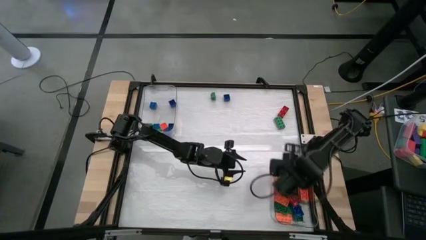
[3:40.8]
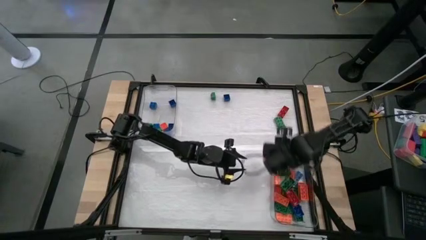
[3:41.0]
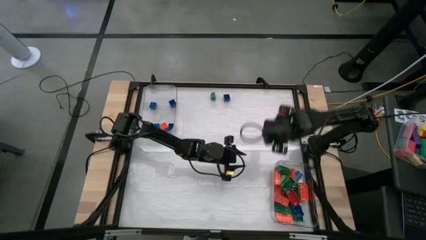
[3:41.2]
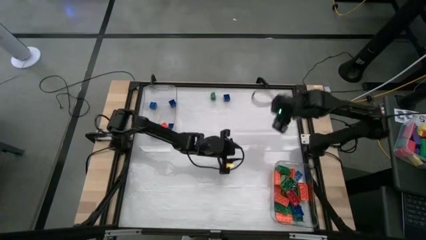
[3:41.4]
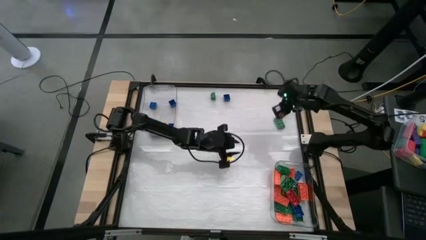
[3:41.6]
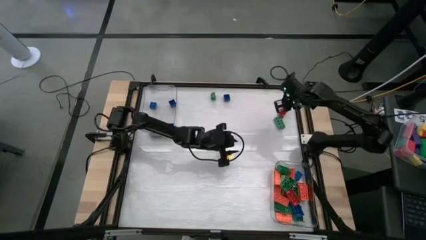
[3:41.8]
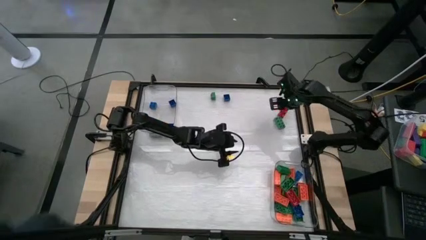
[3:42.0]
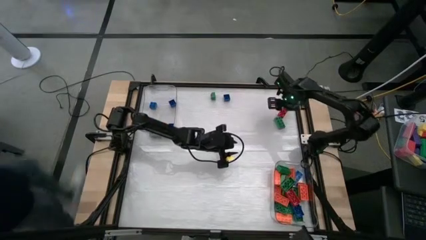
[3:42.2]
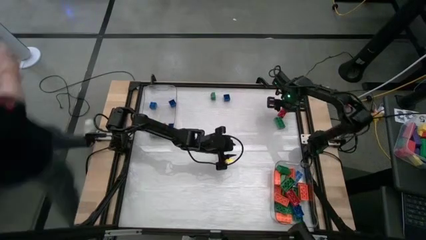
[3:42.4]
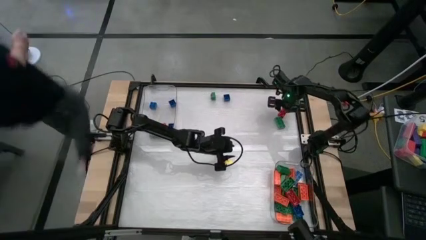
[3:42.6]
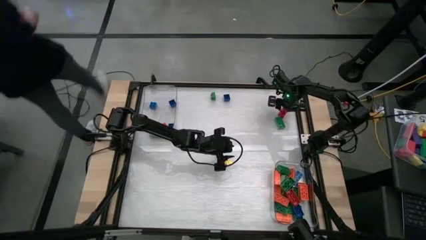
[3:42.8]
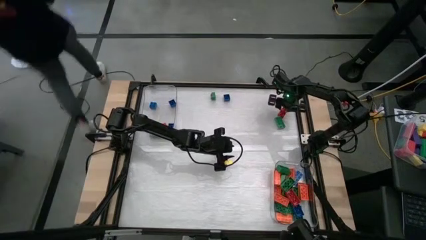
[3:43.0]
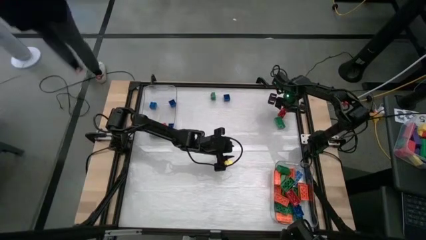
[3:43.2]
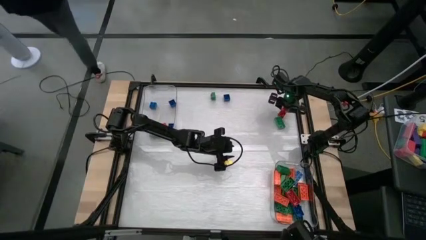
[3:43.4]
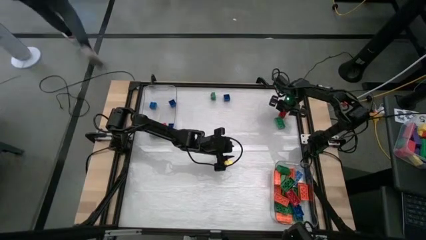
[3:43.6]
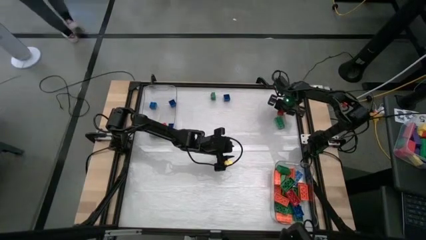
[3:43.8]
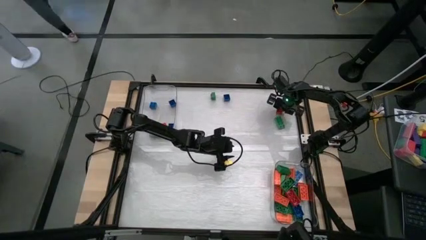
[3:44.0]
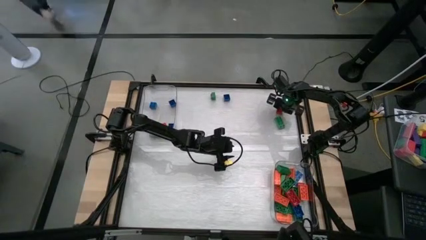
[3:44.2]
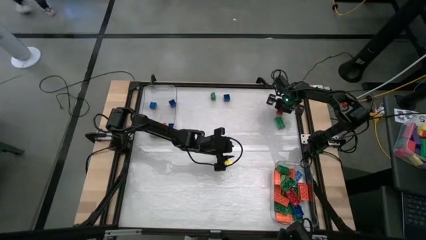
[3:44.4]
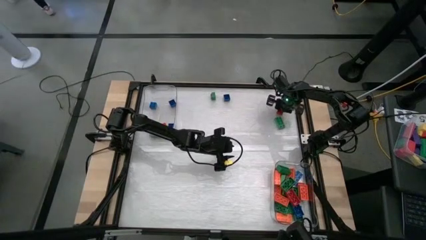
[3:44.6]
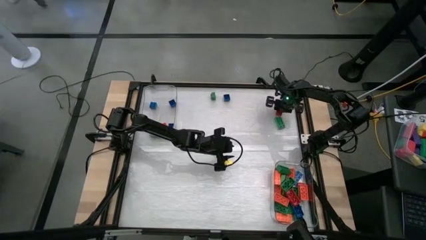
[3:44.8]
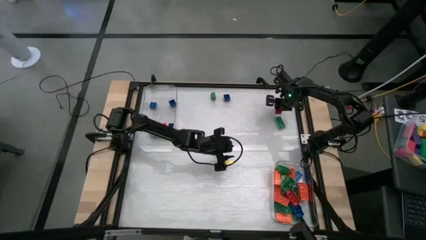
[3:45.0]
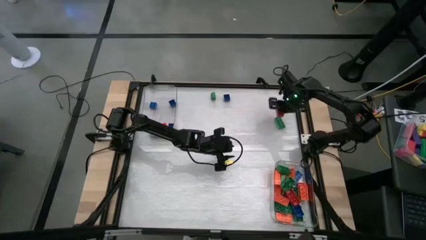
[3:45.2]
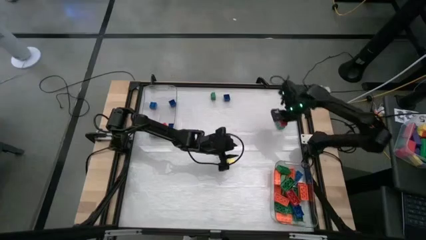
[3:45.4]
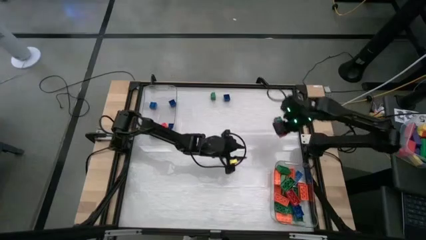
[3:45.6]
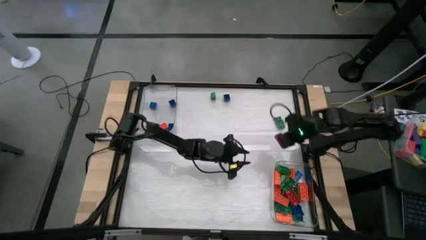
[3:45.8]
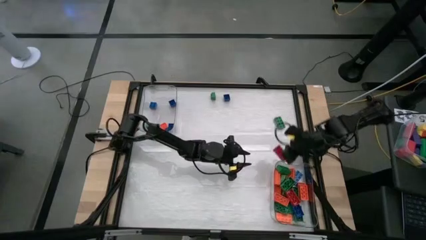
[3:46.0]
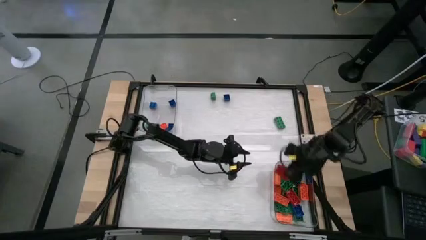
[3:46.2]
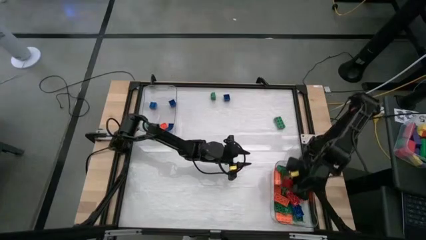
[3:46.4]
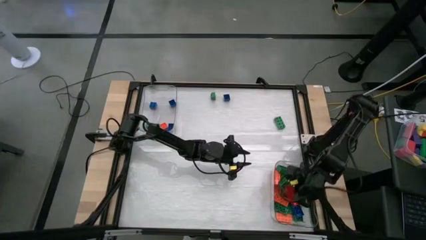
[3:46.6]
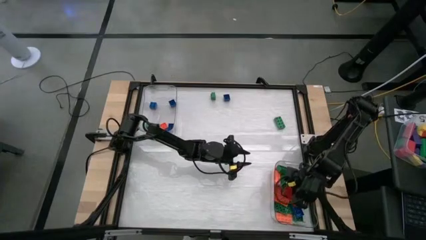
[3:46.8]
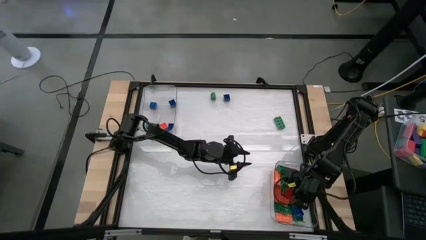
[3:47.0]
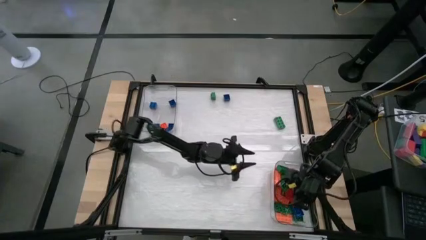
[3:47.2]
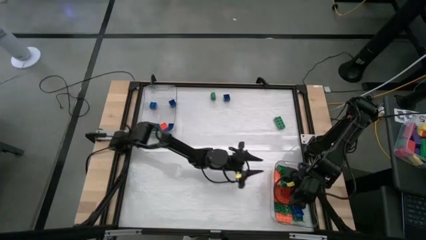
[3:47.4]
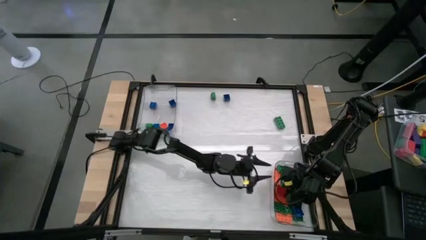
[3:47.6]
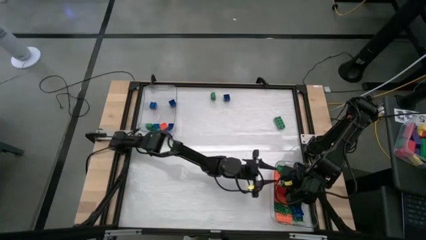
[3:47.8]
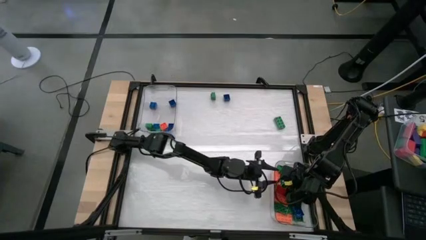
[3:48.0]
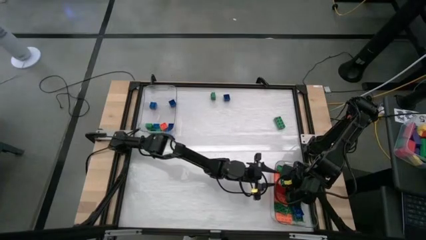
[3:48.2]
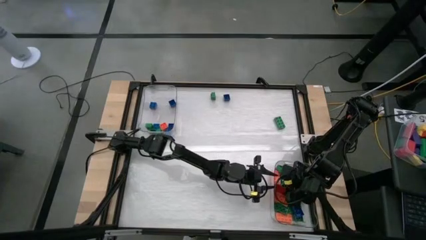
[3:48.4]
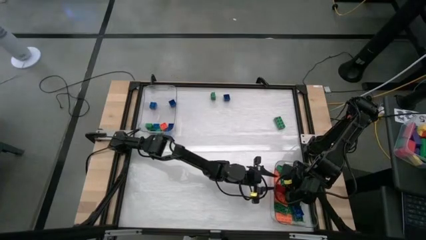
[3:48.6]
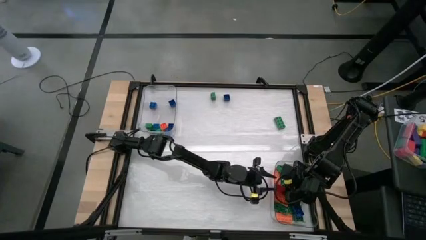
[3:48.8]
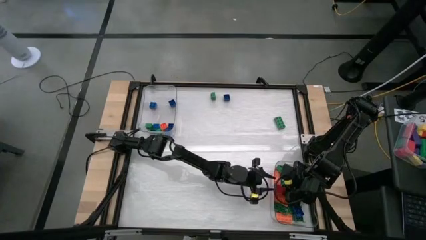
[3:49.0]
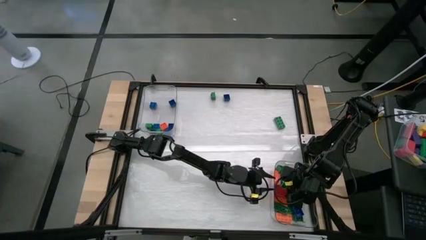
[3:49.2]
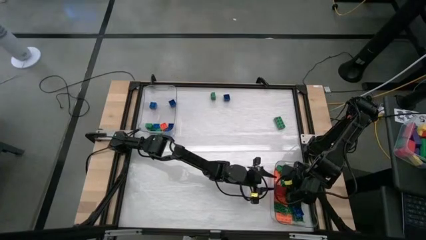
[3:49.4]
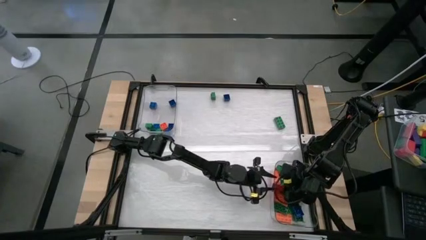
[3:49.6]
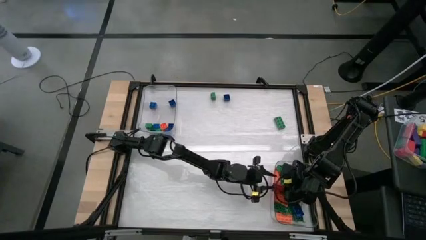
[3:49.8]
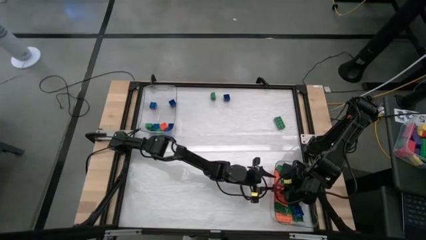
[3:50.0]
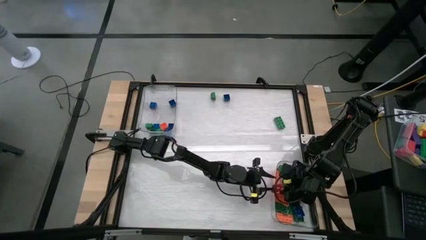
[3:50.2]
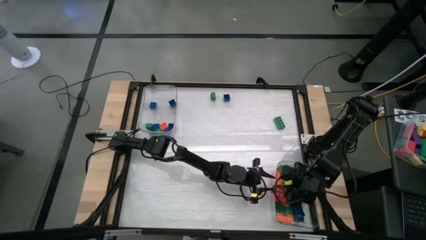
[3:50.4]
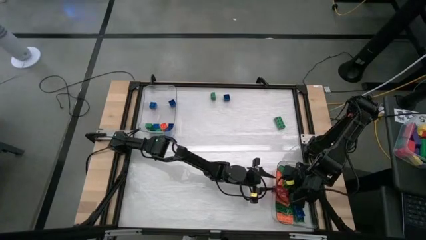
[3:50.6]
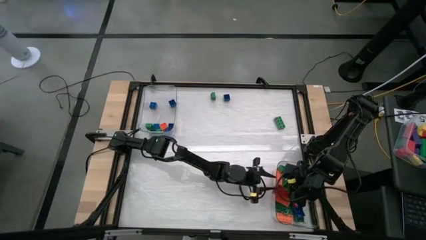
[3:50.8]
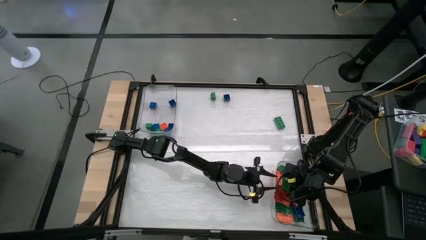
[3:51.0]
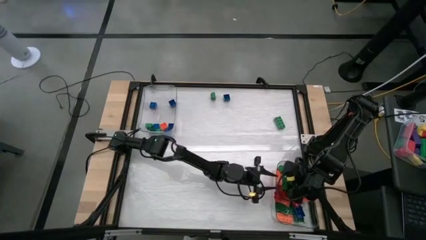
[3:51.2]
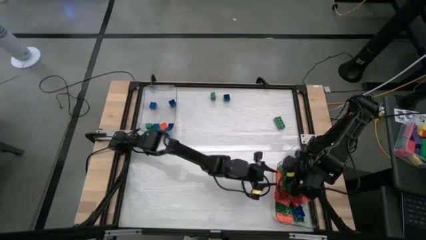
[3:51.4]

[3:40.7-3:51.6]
Task: Sort blocks by size
Put the 8 stud red game piece into the bottom transparent bin

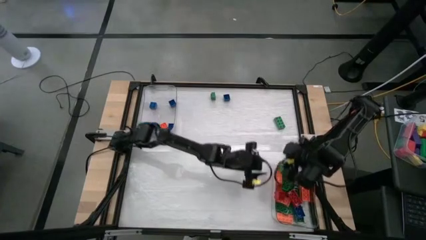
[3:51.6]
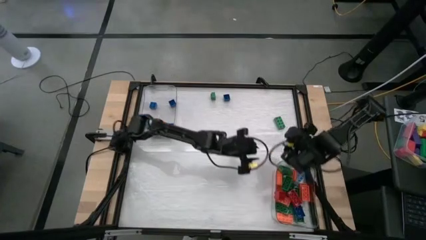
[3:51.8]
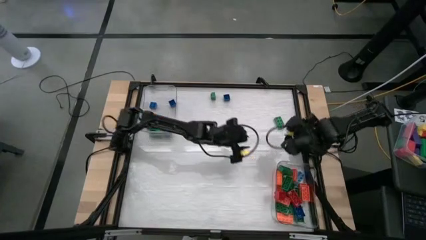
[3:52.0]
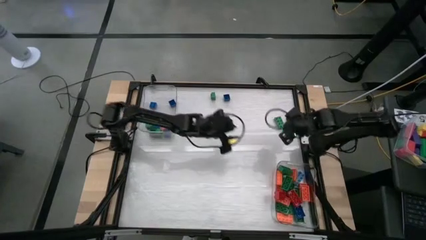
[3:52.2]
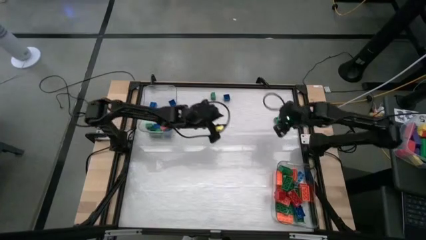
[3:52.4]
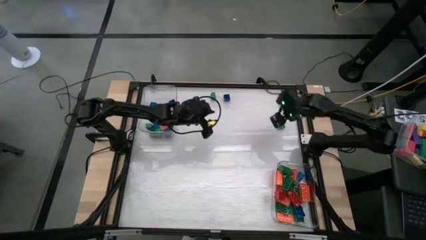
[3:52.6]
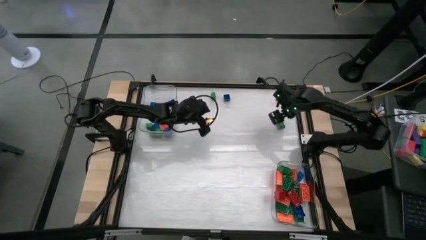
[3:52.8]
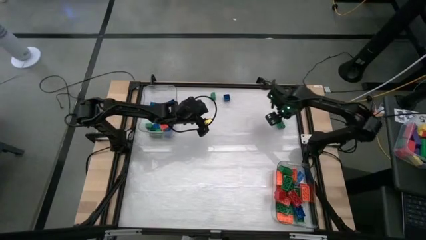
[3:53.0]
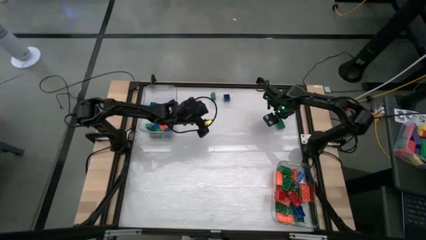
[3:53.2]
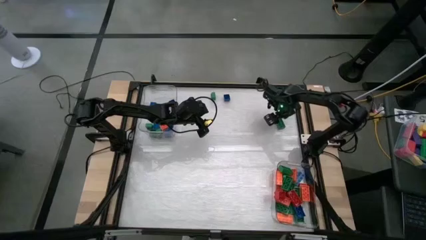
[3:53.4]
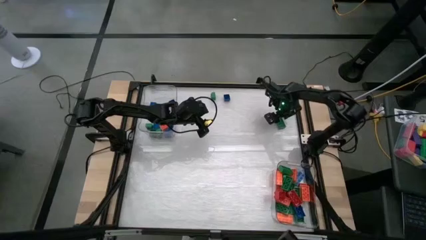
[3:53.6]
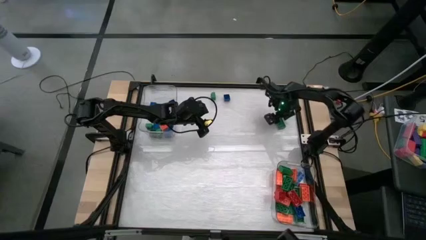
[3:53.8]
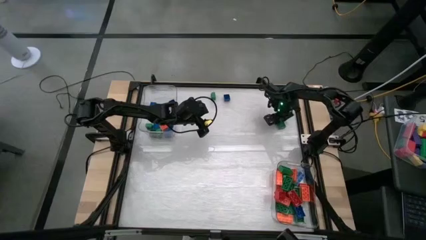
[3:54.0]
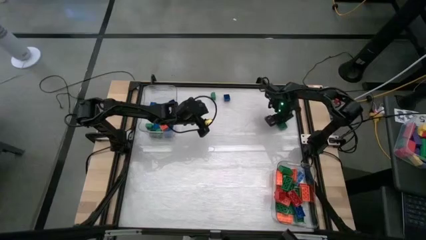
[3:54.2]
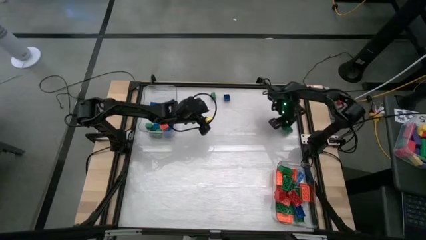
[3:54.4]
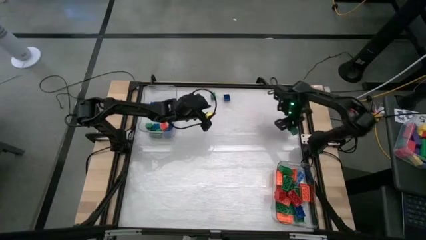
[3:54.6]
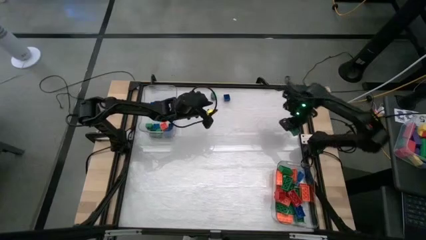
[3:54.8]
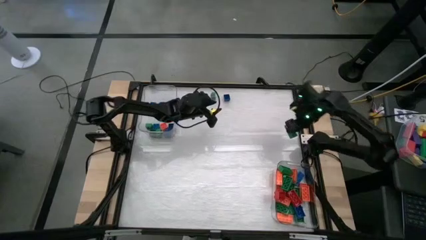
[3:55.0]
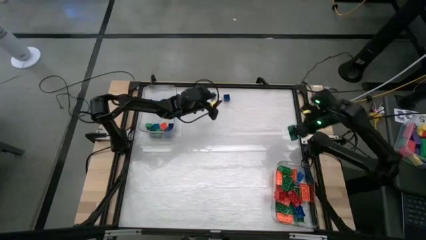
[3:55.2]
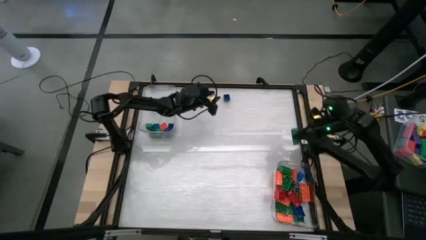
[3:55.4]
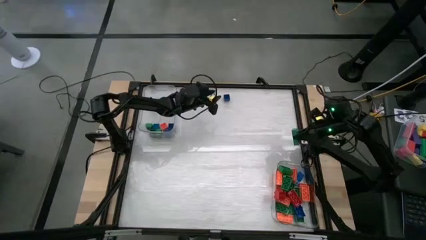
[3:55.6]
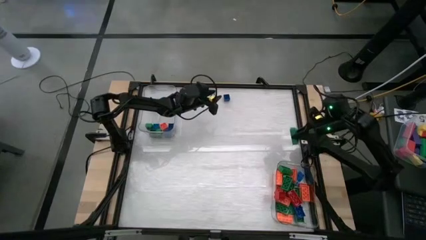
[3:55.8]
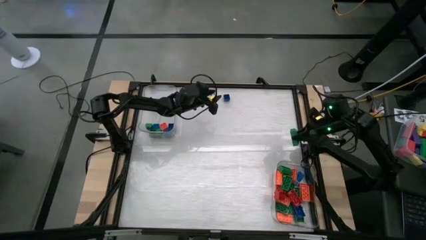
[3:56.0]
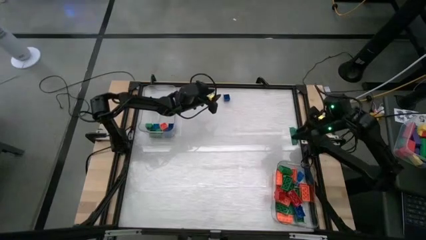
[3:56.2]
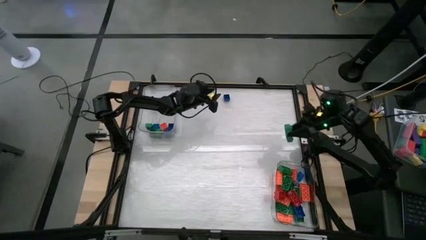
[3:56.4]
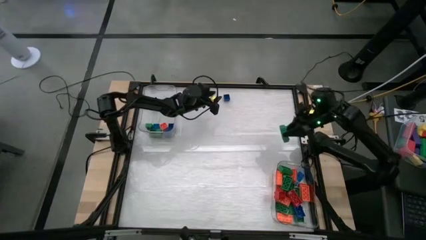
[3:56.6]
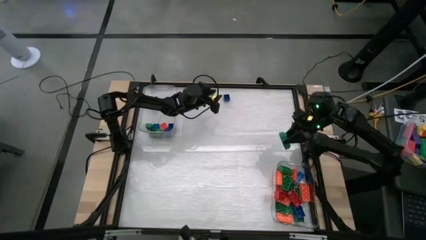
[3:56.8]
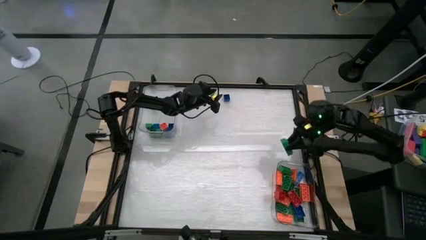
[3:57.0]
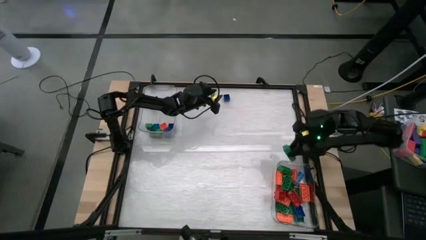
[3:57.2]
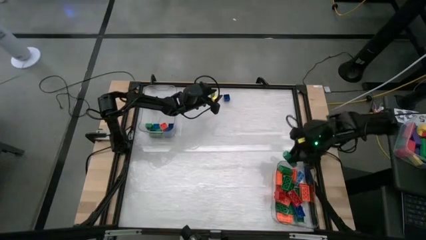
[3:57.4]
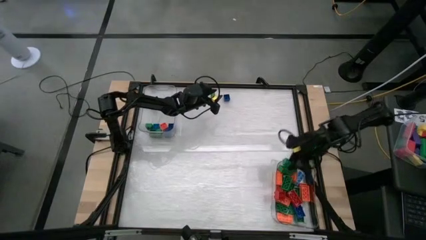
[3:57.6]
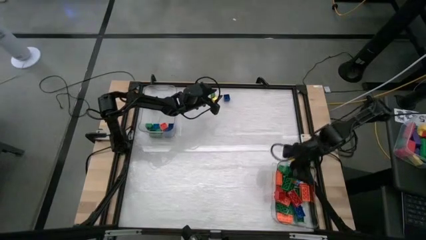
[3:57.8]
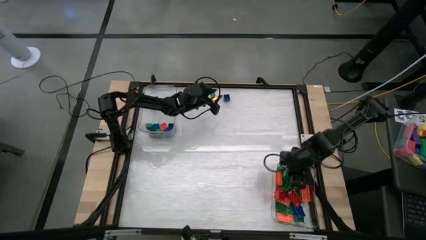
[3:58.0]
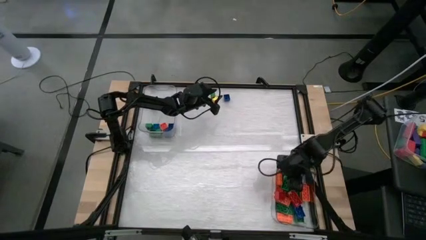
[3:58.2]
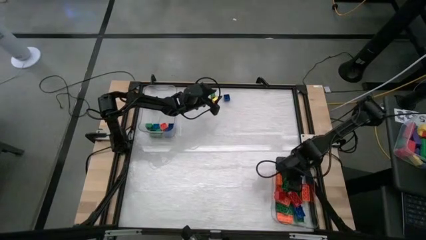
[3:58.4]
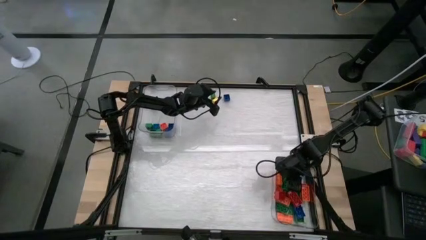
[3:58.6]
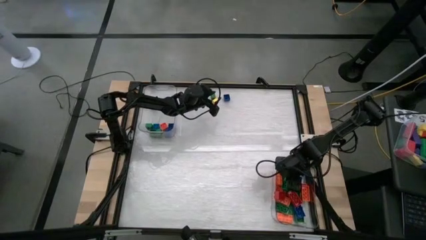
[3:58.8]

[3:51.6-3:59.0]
Put the 8 stud green game piece into the bottom transparent bin
